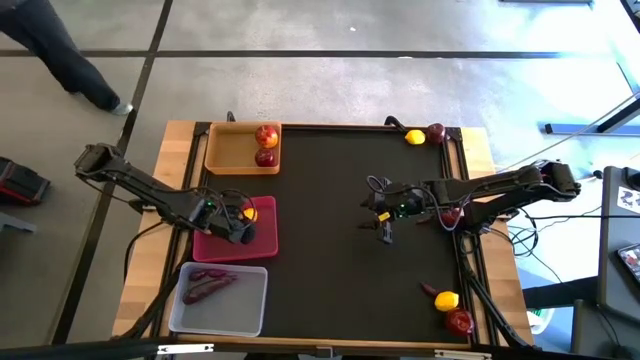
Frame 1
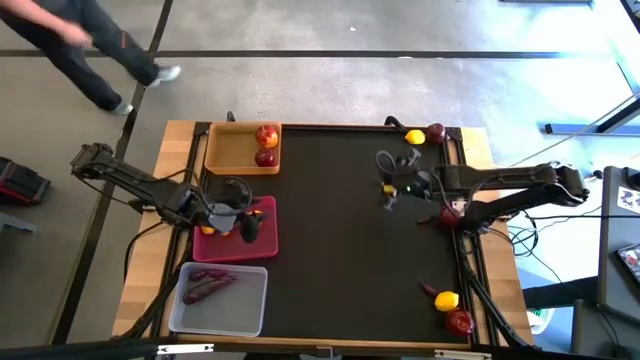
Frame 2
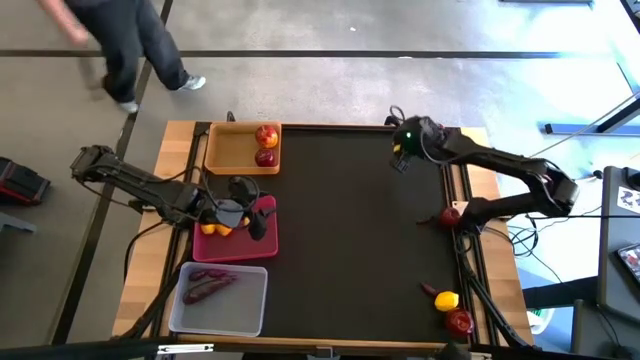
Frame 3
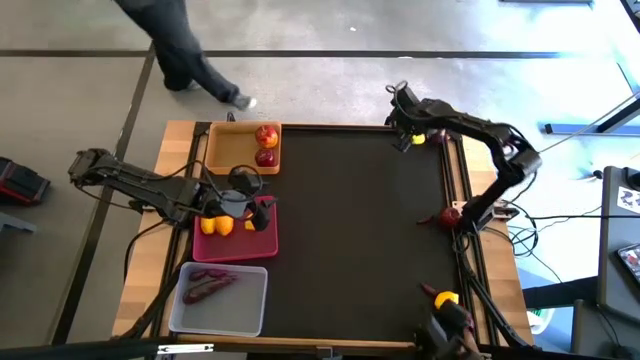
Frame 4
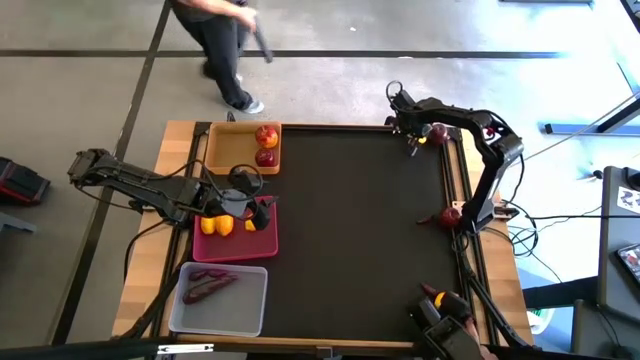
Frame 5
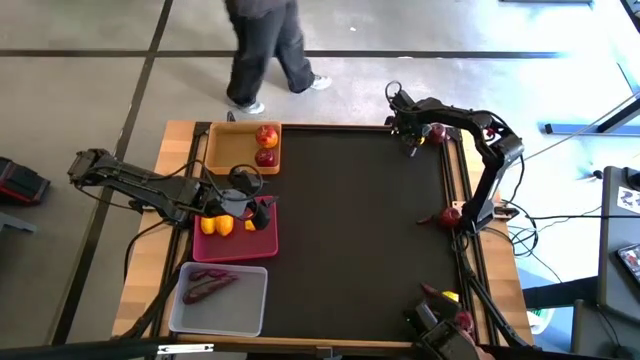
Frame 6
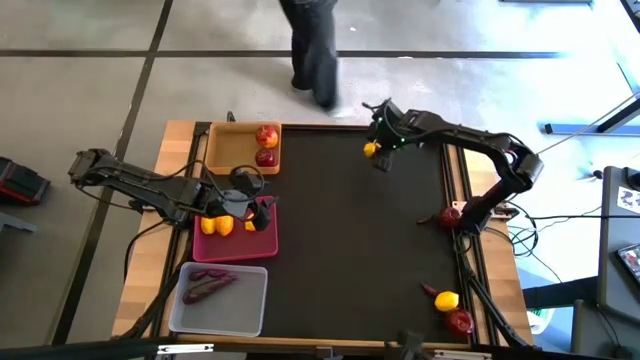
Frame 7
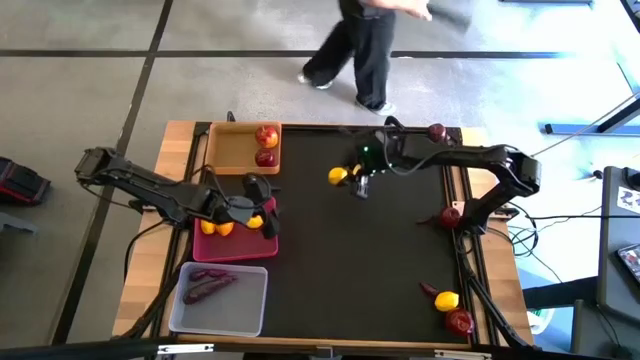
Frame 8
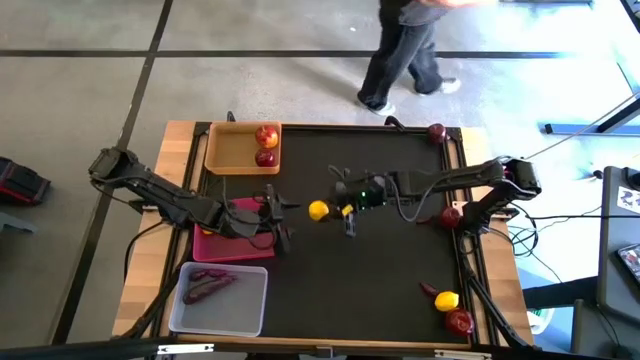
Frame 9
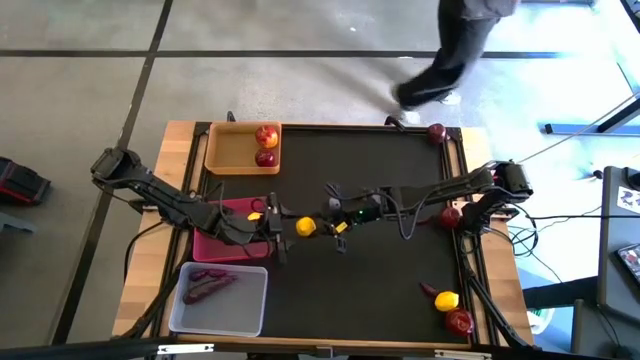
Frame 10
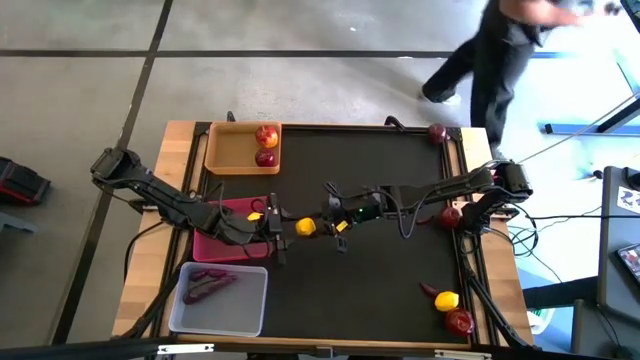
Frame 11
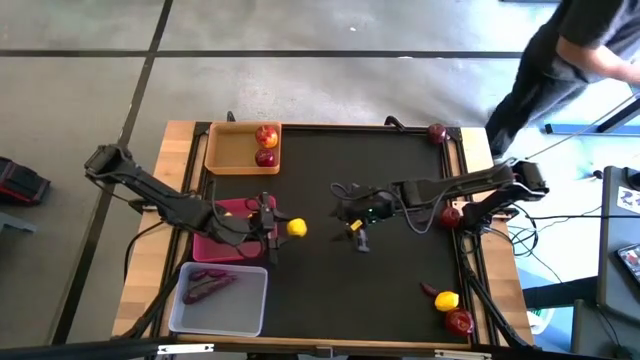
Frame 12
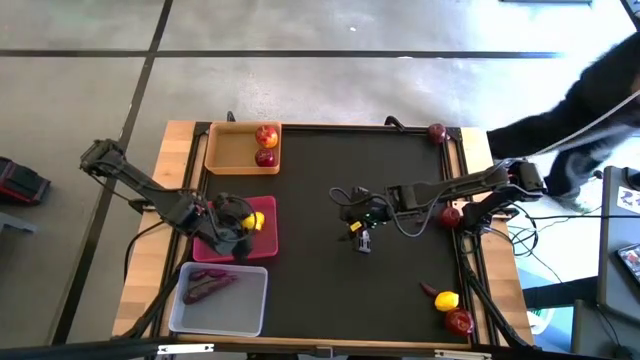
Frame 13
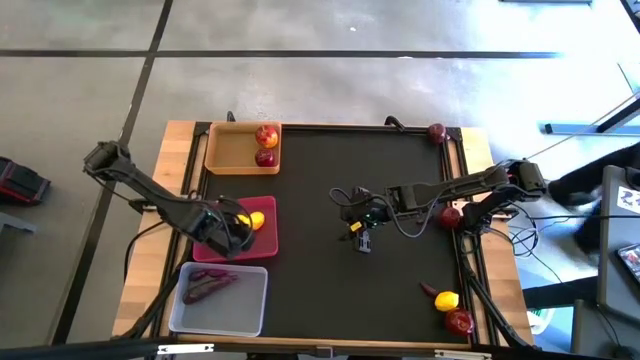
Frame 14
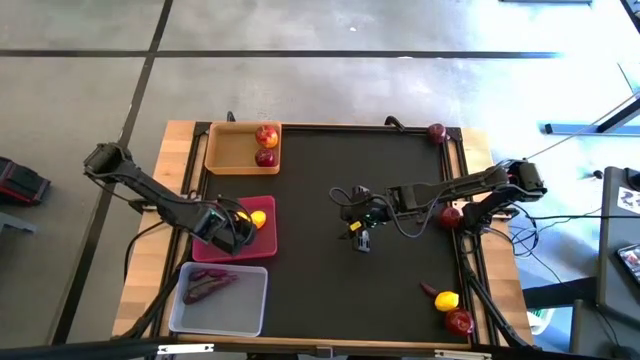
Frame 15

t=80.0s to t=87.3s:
Task: Sort produce into baskets
Put the top lemon into the pink bin

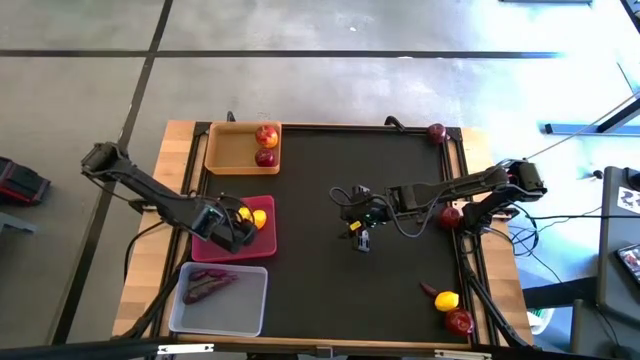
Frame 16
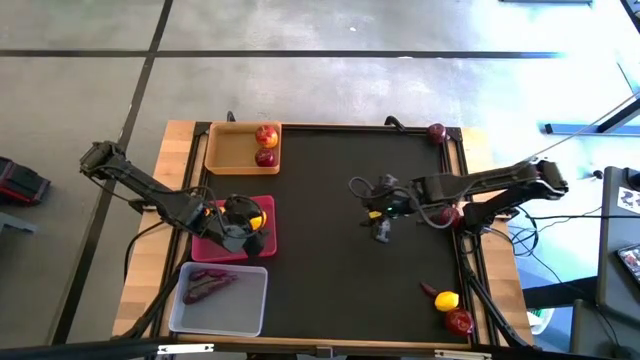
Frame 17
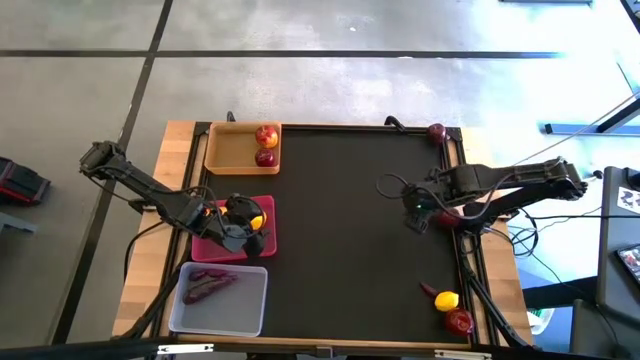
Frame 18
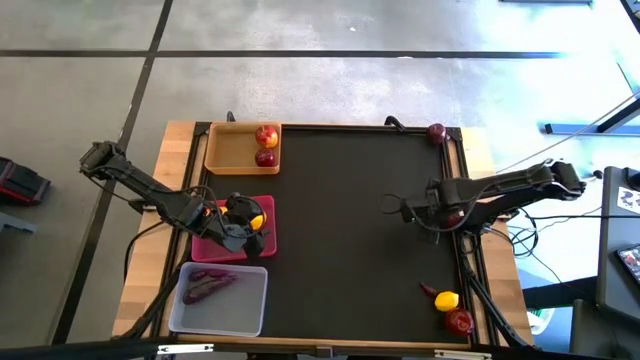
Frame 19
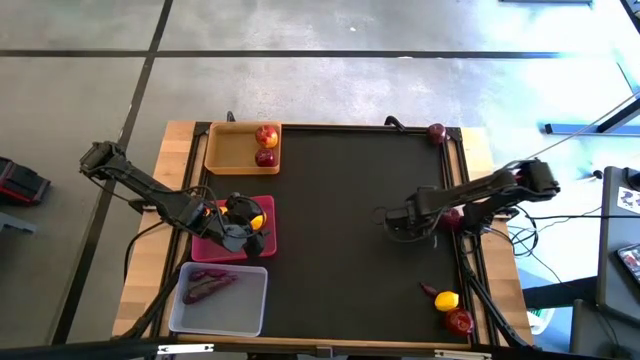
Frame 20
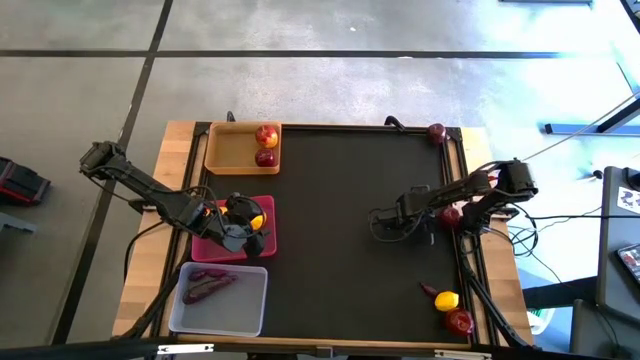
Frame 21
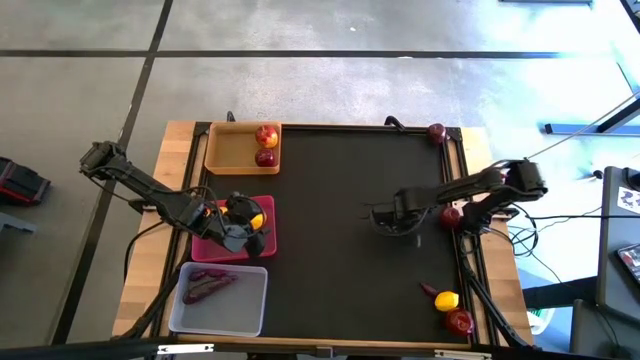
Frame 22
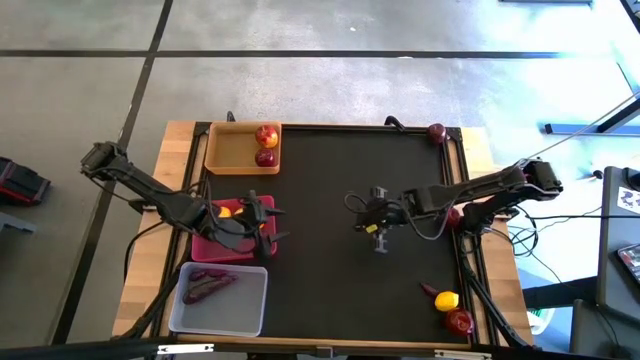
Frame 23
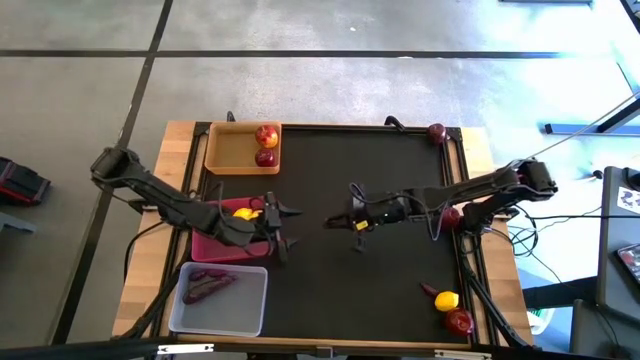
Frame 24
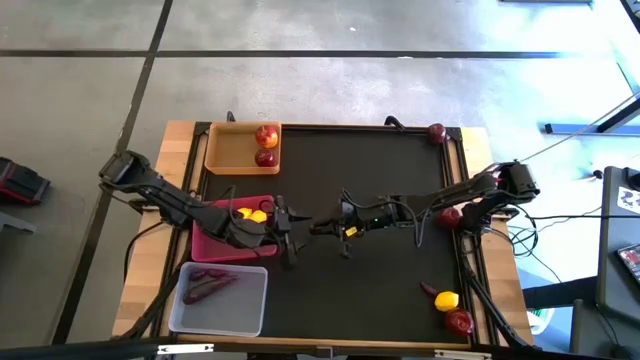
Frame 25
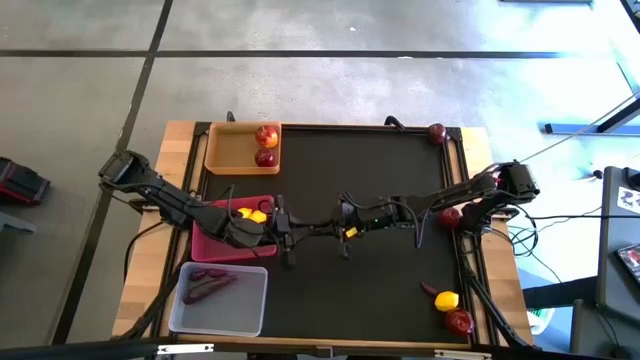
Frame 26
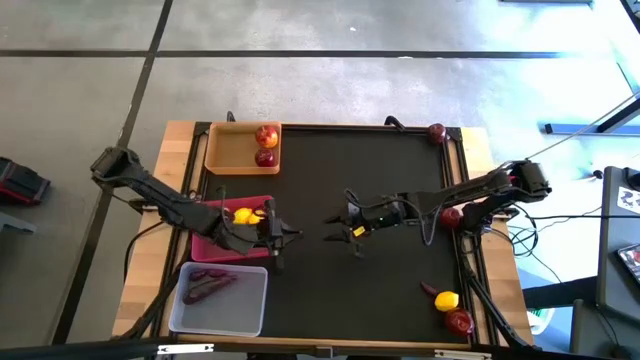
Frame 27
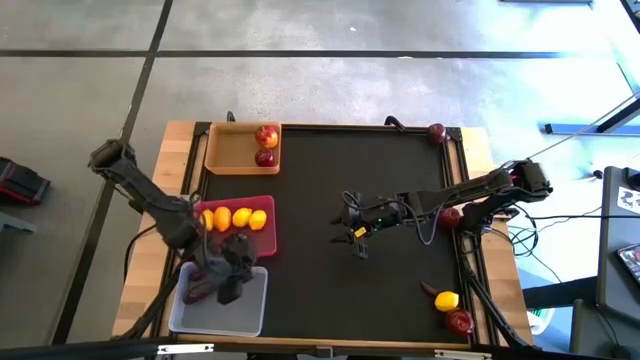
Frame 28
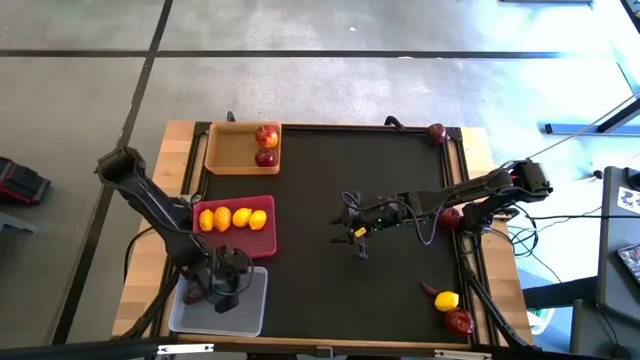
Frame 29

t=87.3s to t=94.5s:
Put the top eggplant into the transparent bin

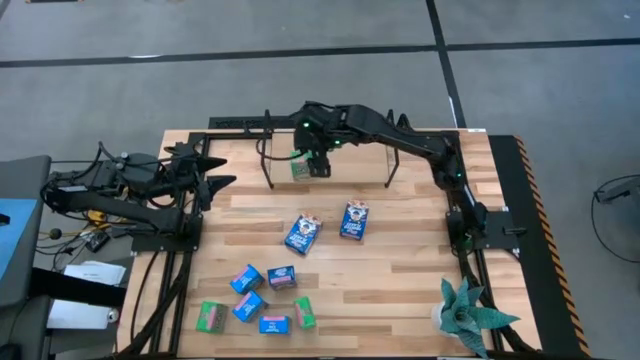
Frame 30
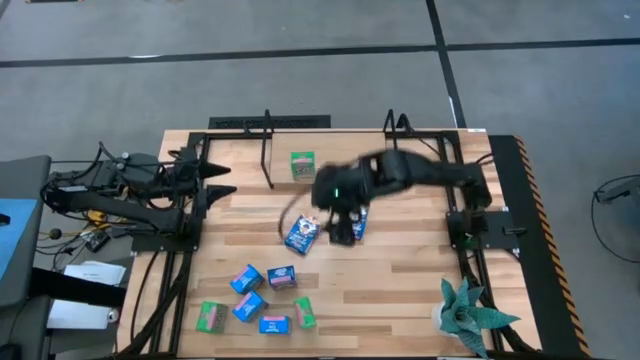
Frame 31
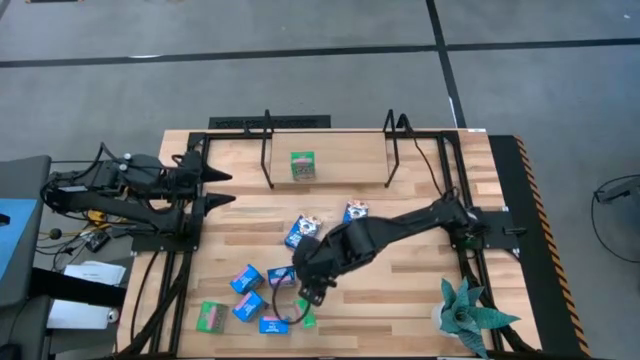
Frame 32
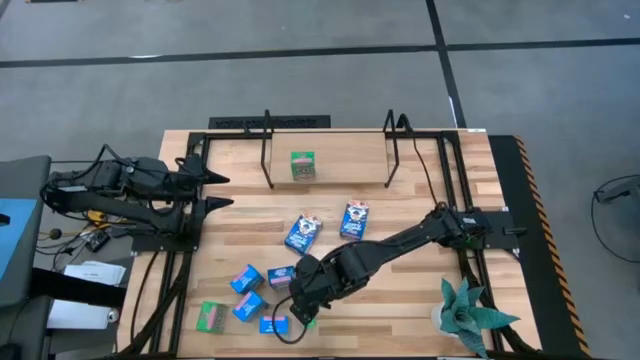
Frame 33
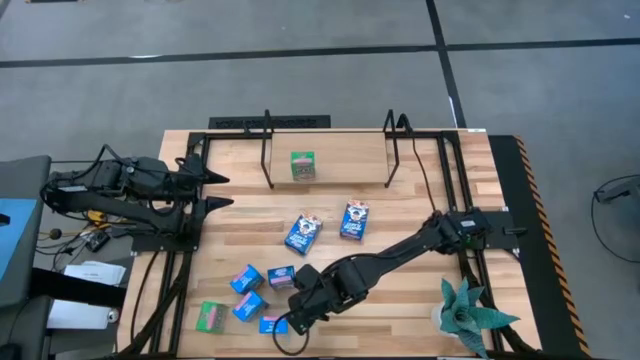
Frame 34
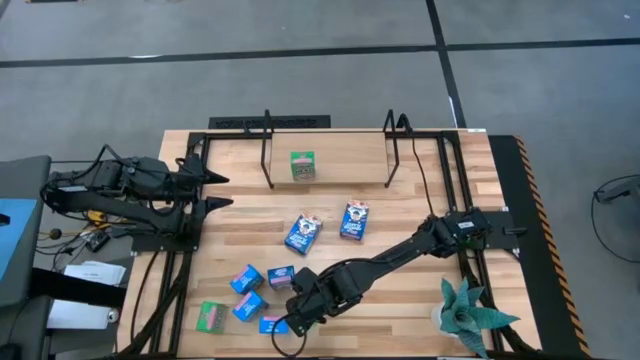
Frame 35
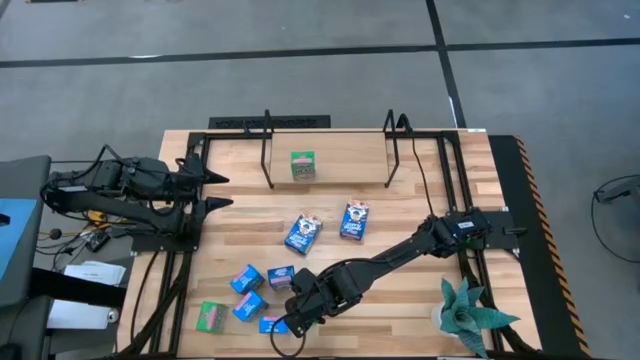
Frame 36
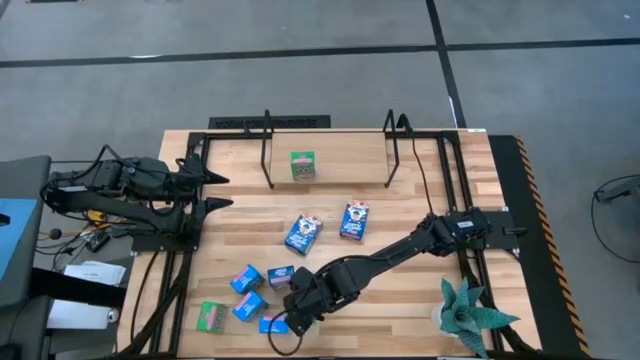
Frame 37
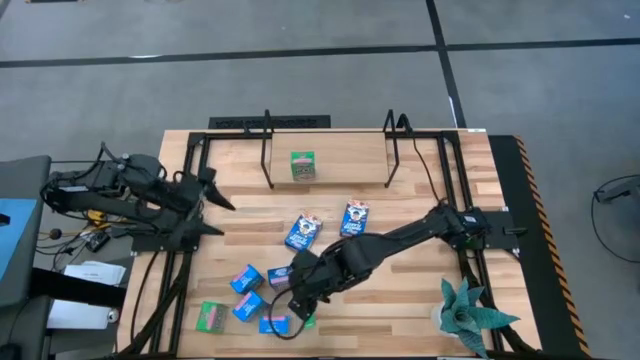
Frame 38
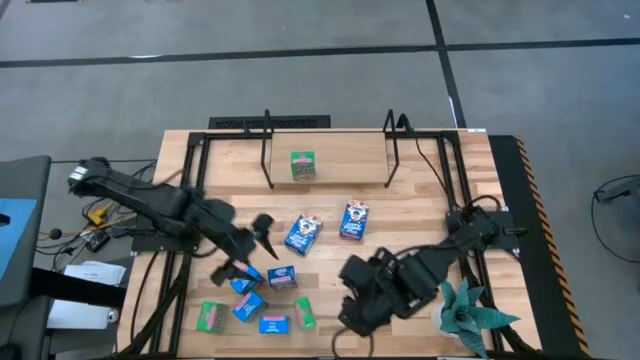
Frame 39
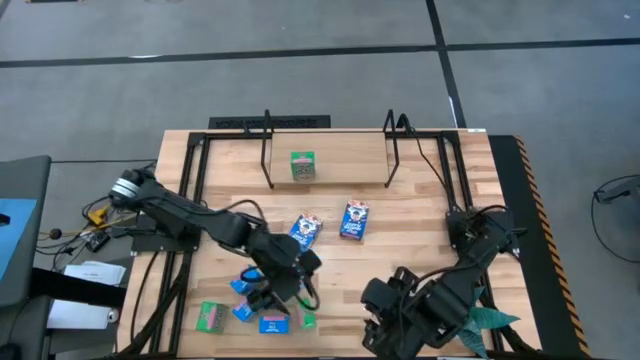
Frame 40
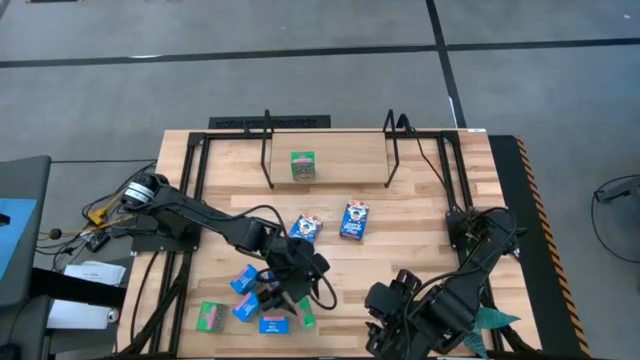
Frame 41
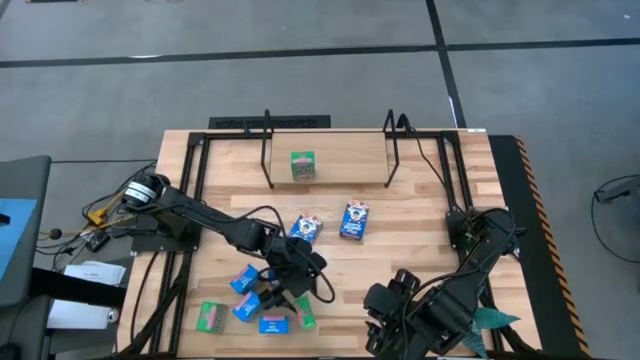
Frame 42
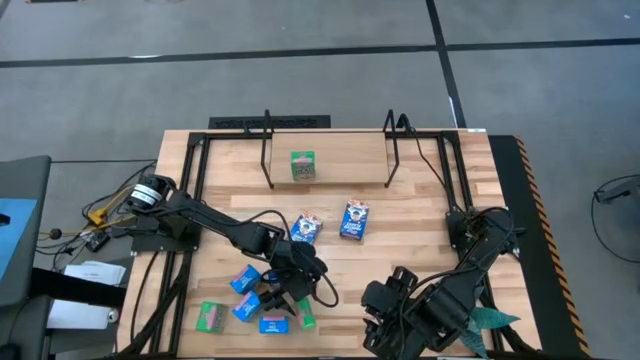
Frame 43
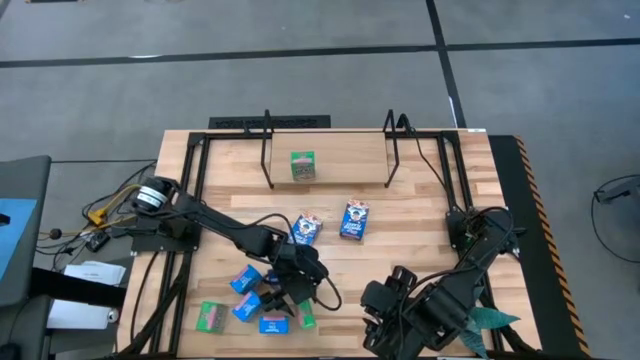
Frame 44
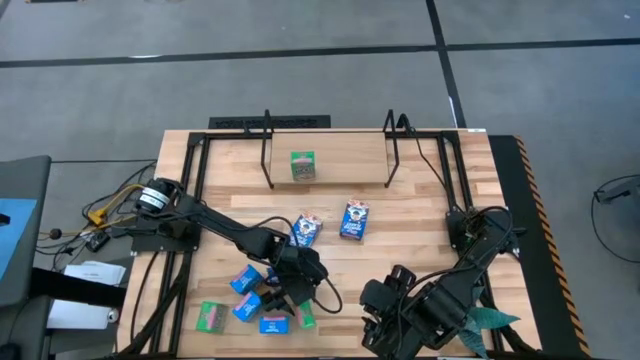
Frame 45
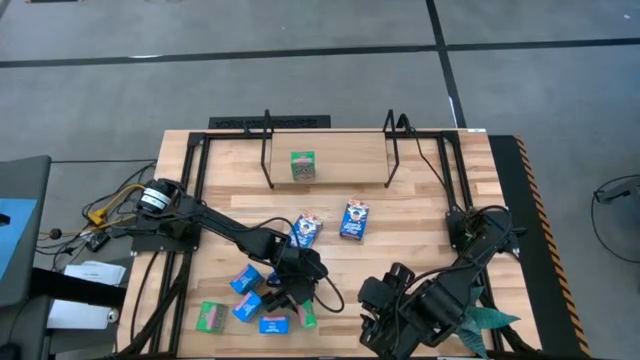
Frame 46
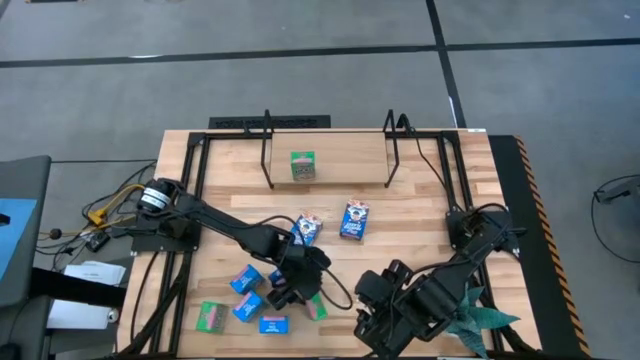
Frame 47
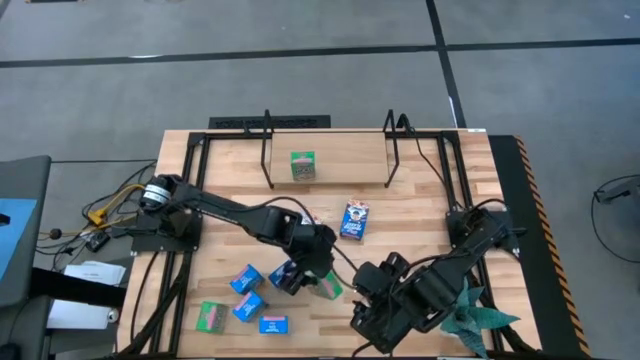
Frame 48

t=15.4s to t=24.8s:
Task: Stack cereal on shelf
Put the right green cereal box on the shelf aligned with the other green cereal box
